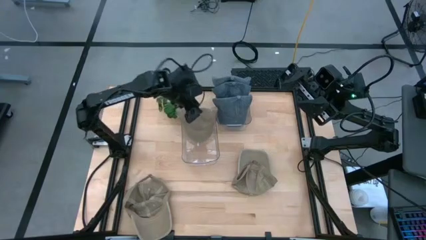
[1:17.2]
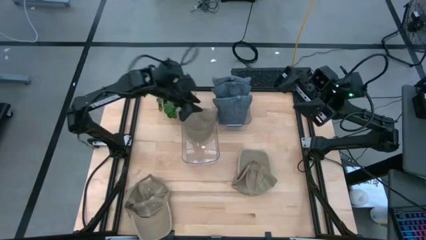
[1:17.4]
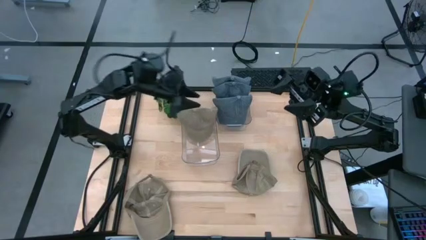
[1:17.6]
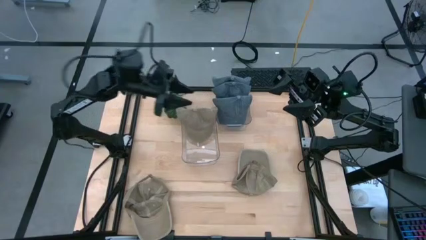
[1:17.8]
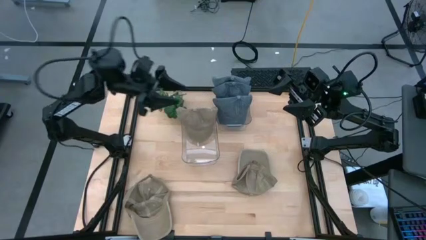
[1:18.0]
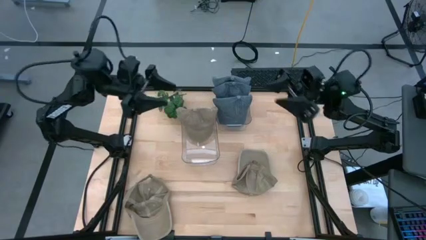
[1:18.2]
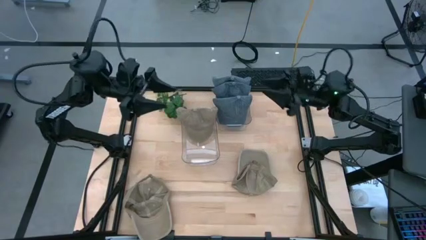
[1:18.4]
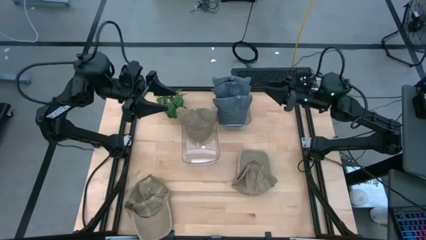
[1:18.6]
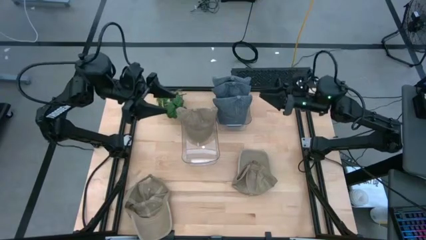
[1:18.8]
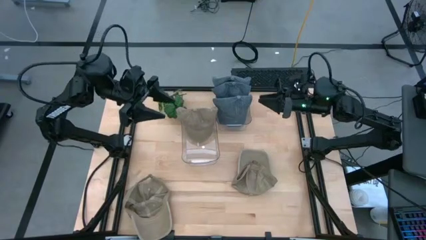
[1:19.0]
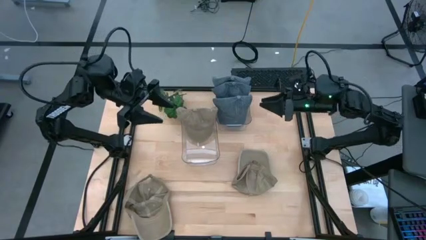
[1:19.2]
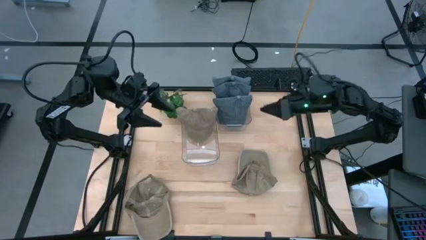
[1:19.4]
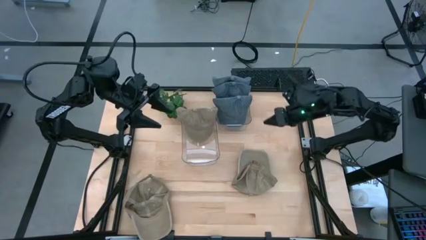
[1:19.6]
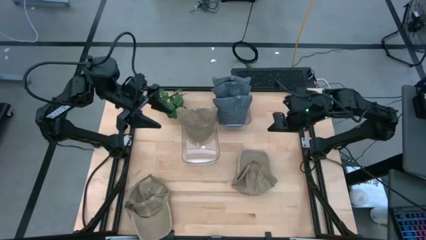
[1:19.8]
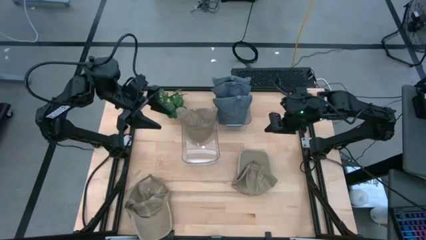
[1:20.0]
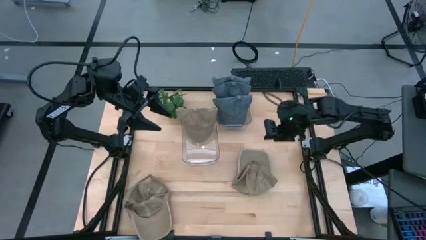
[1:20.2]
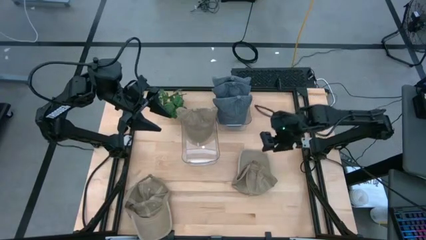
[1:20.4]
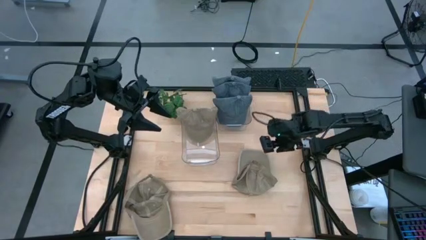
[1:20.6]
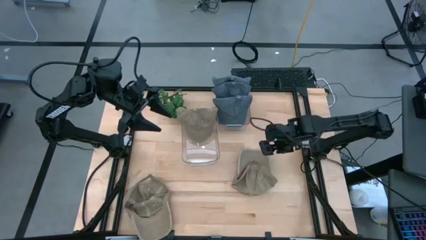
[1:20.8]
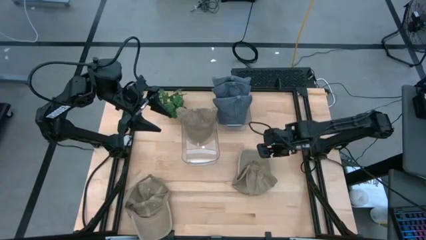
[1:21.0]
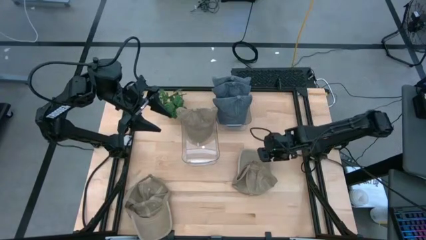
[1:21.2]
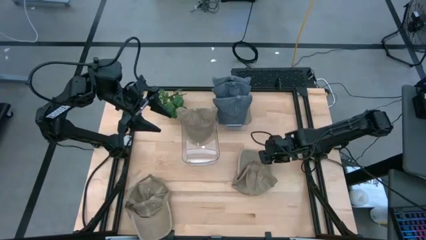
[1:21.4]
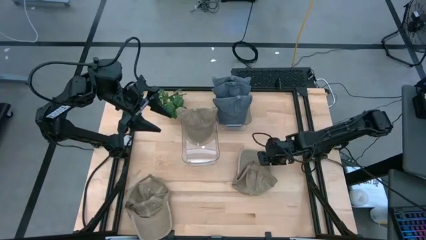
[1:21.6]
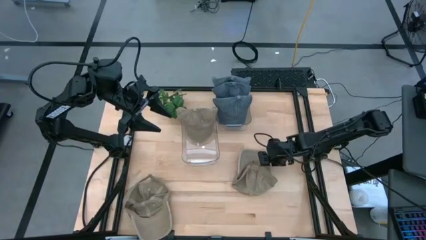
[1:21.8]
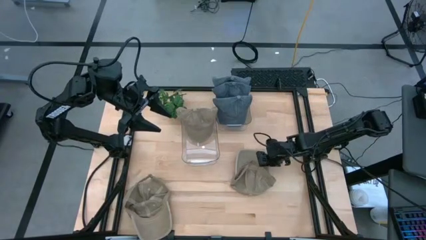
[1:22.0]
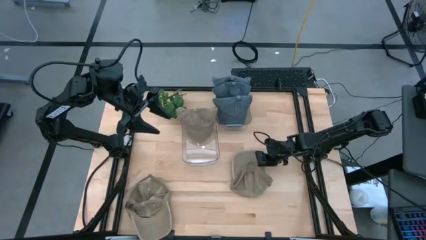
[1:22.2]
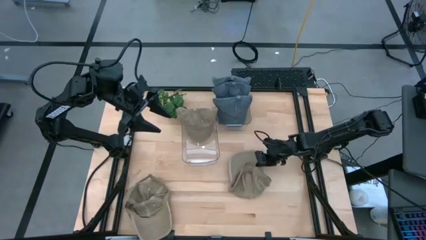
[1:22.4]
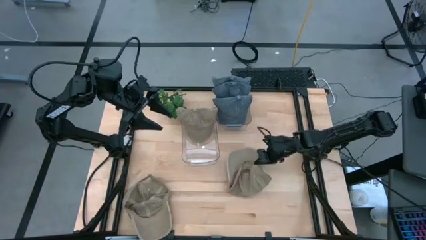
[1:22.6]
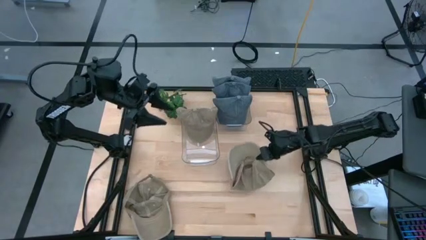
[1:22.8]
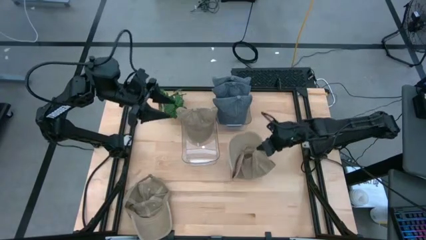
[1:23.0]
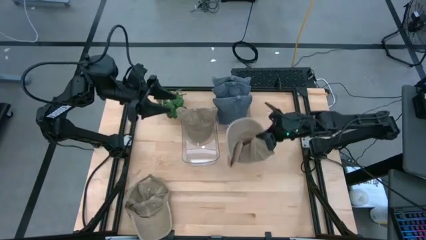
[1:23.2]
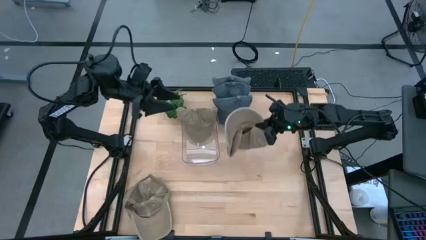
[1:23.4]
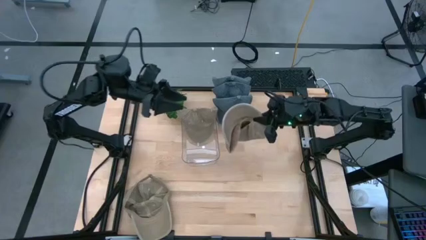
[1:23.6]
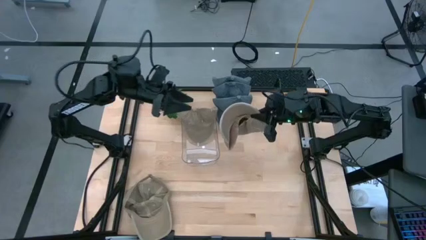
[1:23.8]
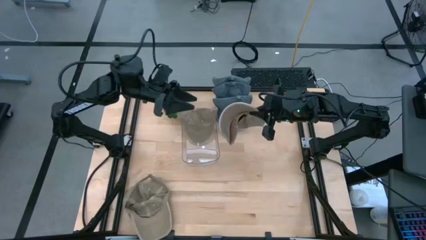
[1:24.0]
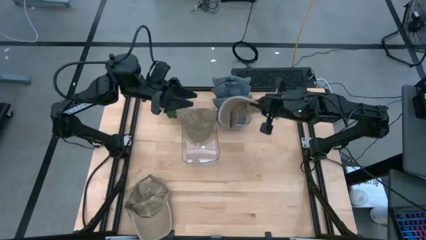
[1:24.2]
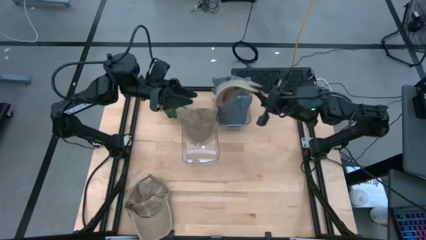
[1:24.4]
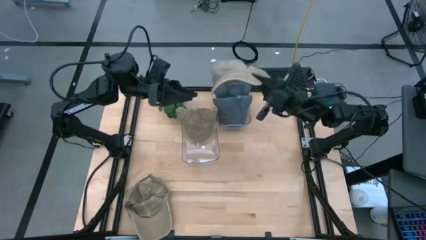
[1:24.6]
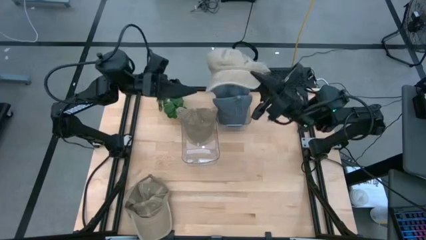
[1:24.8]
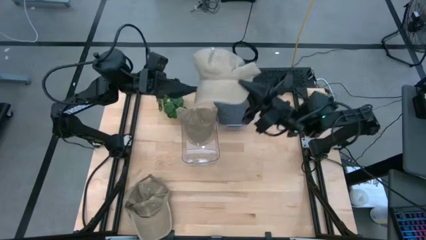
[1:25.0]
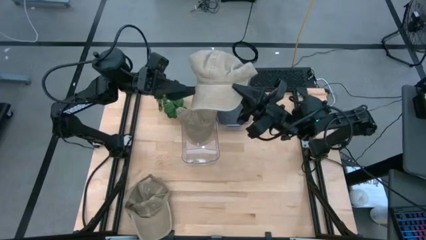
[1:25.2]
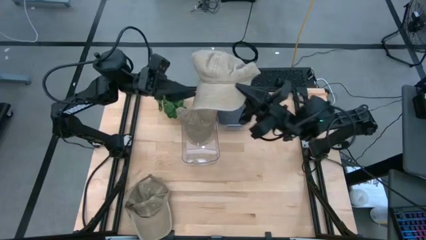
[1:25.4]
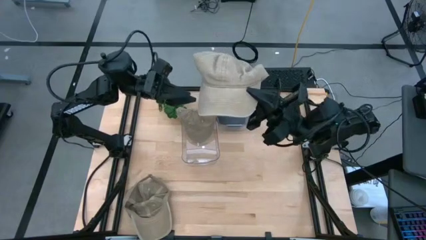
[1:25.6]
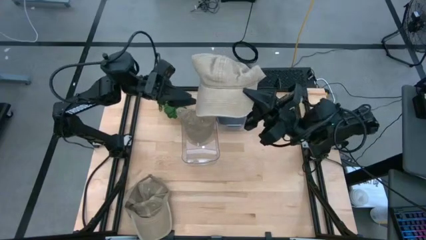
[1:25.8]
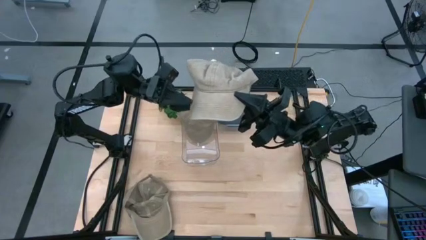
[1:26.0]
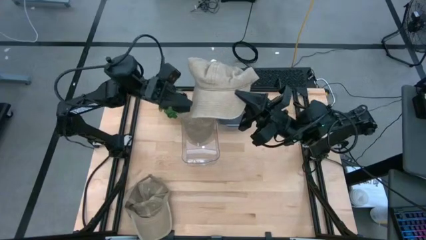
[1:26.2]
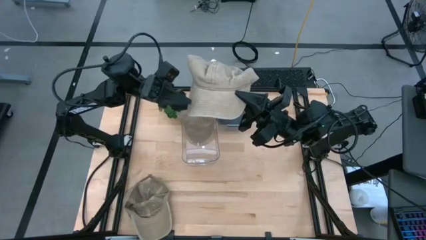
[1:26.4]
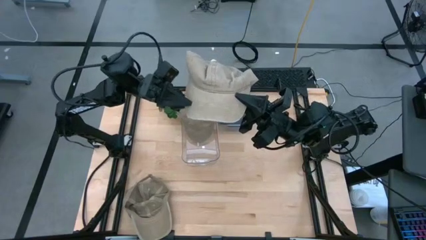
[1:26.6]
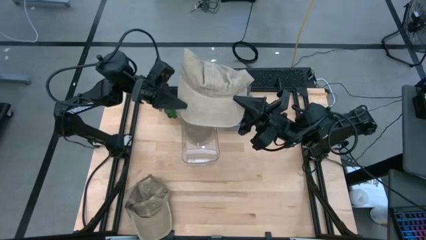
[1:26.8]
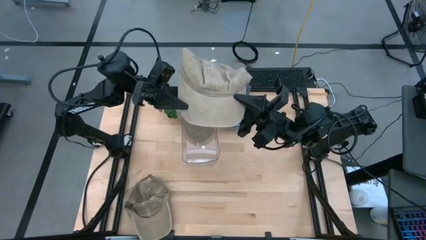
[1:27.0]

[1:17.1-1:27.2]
Task: Pick & Place hat
Put the right brown cap into the left transparent bin

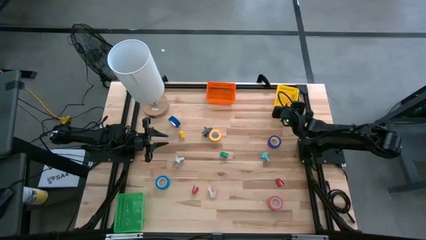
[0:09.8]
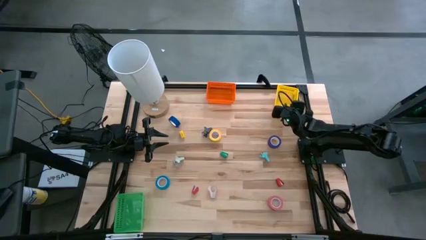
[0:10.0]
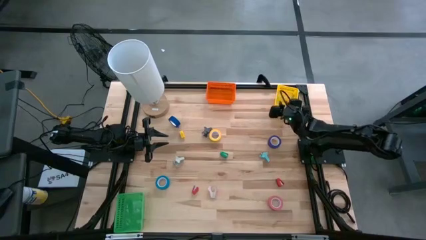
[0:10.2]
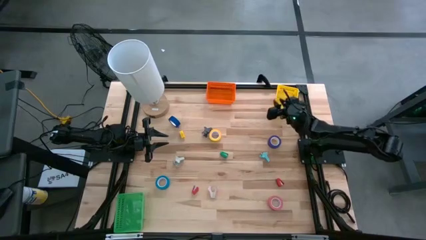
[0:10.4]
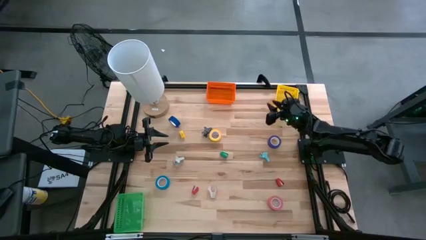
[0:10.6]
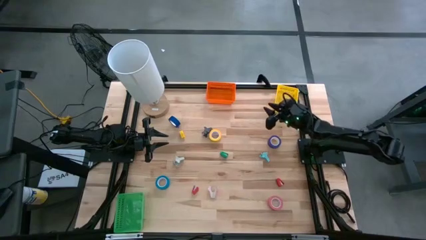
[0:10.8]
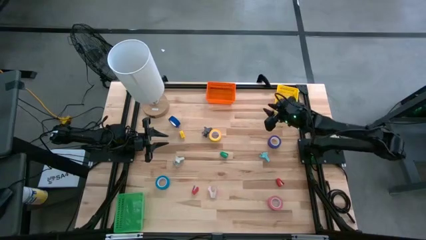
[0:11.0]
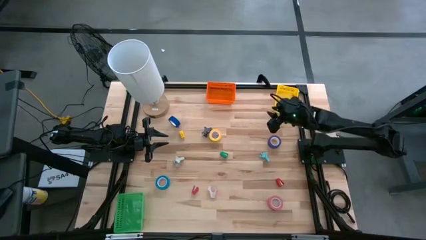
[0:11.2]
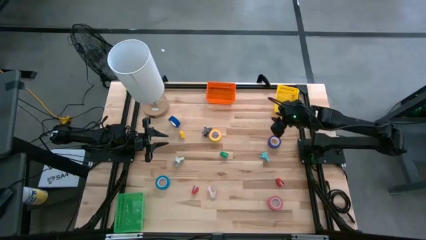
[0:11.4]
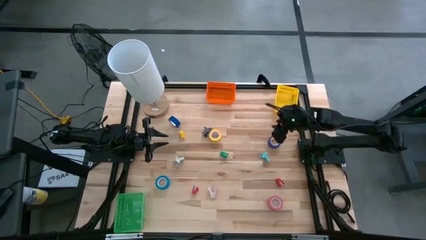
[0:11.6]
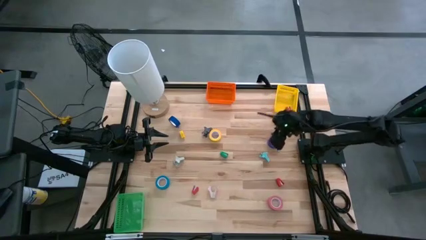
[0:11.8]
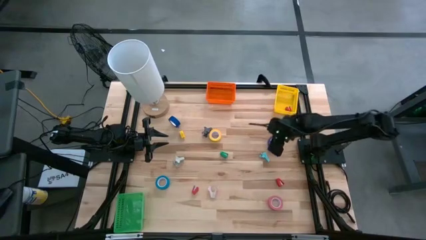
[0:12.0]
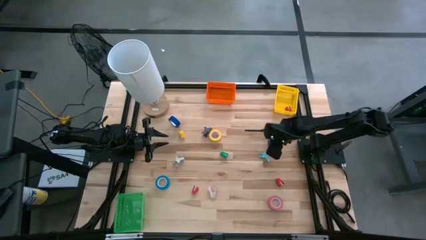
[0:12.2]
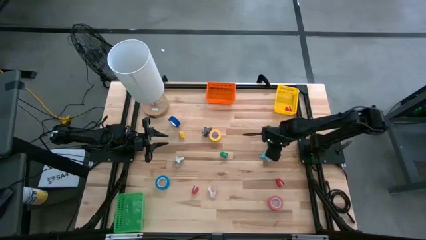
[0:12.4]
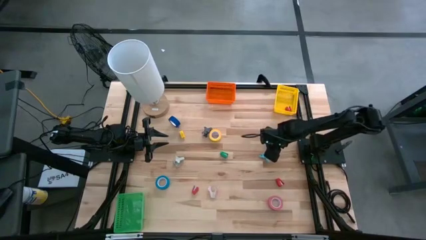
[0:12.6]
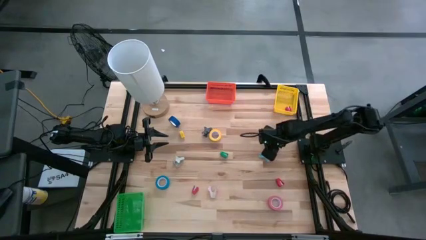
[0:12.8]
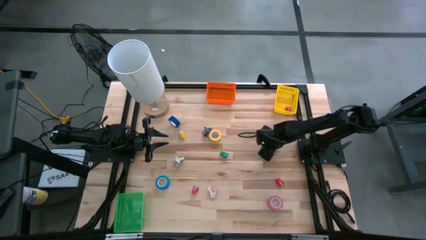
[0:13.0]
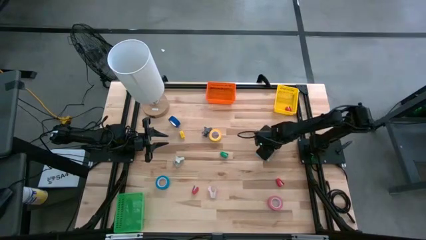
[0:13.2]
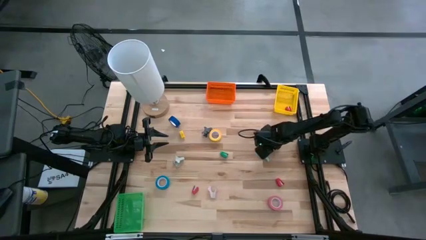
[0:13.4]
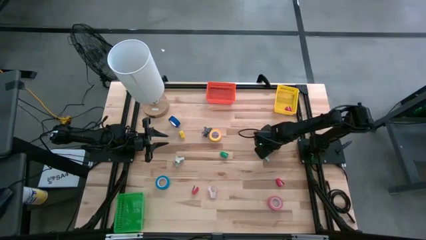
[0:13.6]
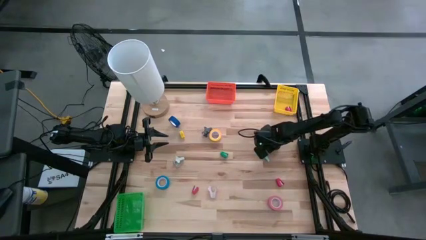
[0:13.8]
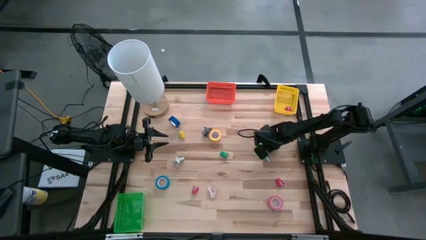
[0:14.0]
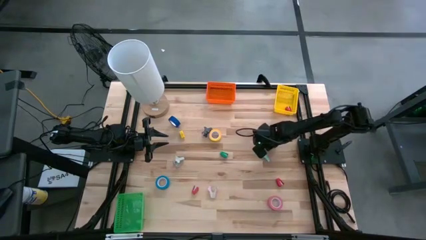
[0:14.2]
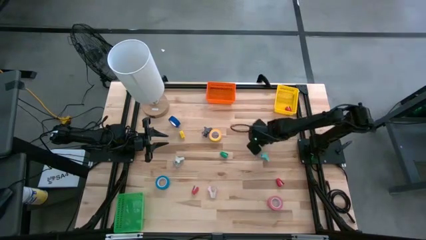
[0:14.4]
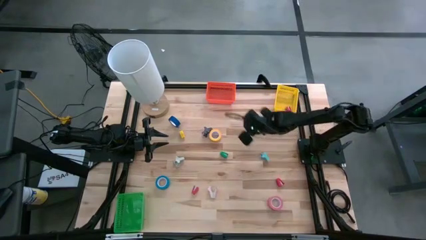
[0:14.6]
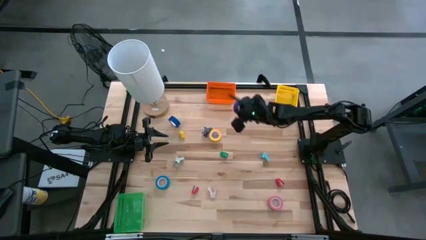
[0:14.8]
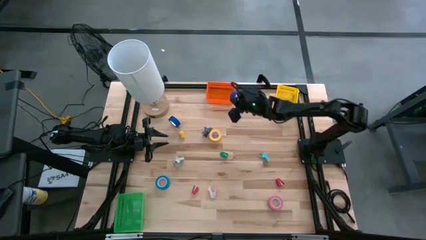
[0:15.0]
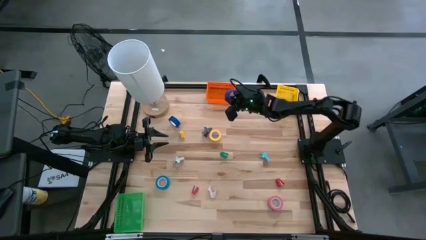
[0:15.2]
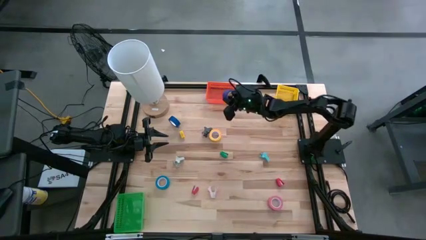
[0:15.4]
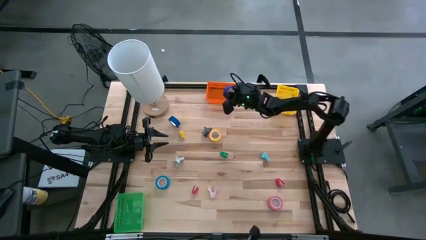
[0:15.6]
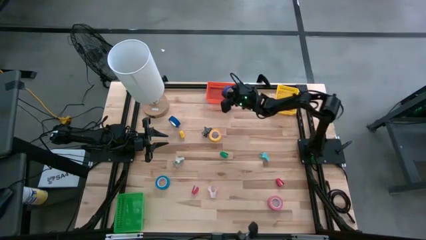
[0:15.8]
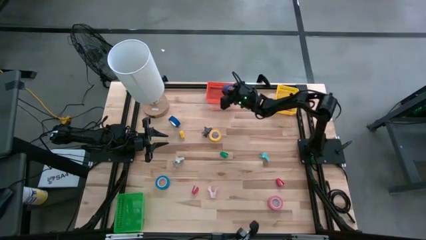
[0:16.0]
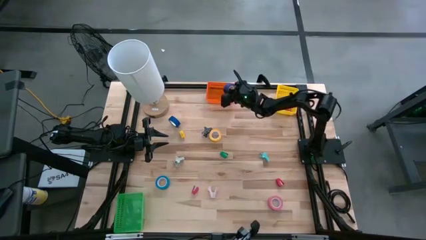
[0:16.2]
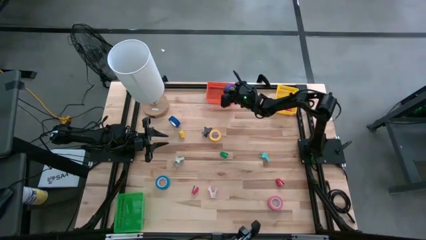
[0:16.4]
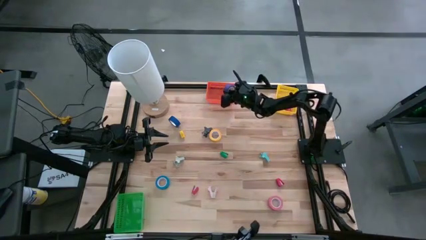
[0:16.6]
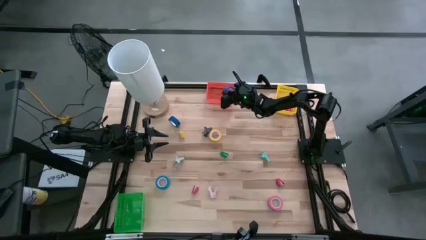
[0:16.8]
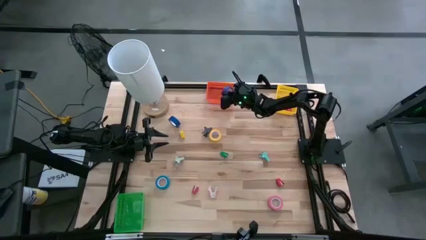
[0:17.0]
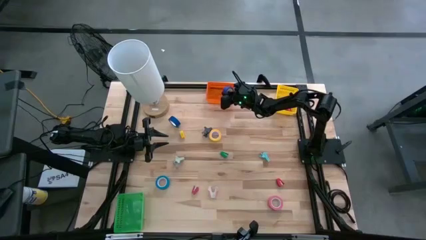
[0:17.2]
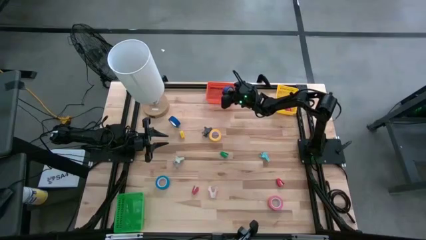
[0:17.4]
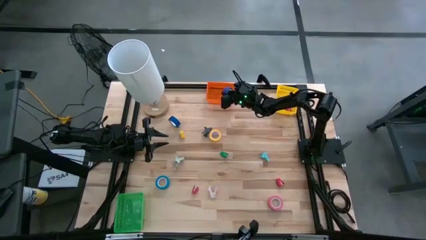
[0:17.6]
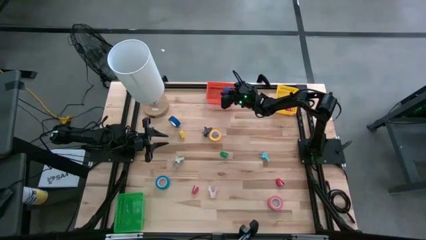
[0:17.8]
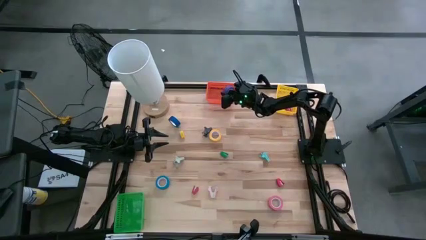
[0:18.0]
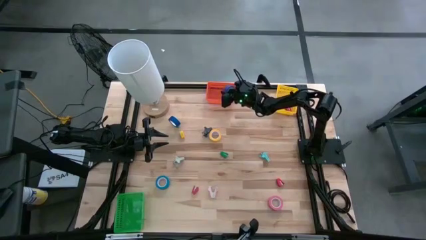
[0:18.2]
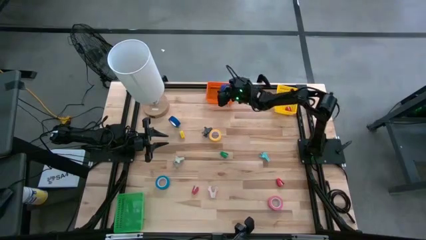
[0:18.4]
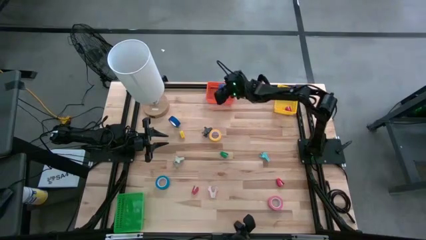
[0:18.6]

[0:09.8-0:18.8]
Task: Pick and place Stapler, Stapler remover, tape
Put the right blue tape into the orange bin
